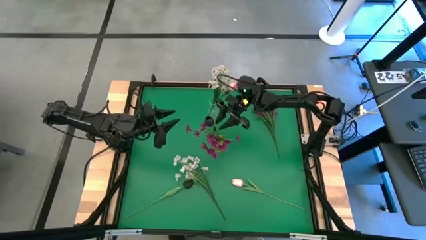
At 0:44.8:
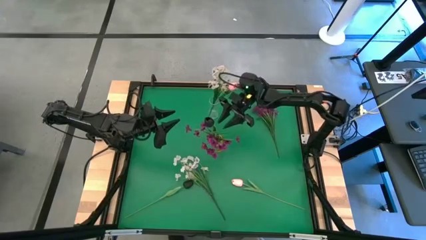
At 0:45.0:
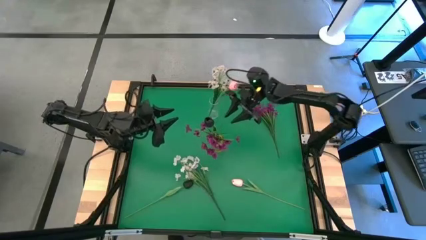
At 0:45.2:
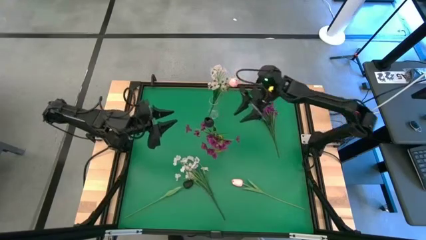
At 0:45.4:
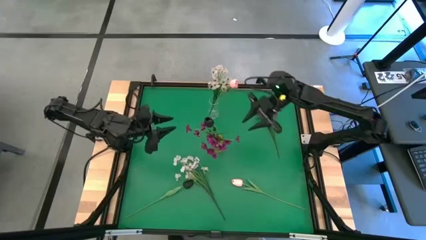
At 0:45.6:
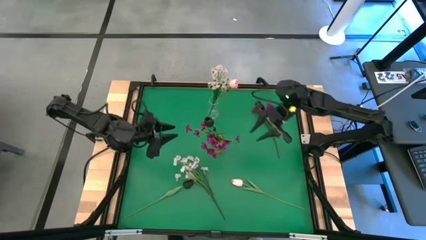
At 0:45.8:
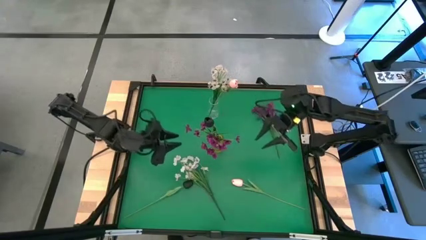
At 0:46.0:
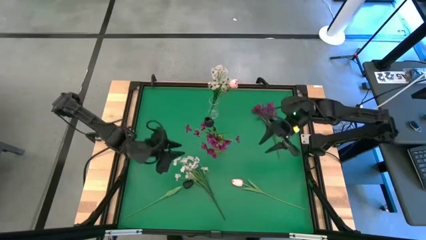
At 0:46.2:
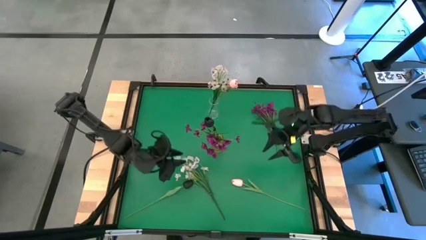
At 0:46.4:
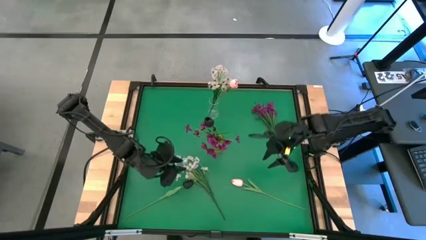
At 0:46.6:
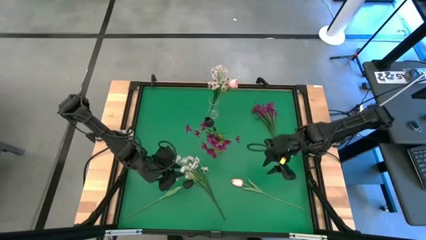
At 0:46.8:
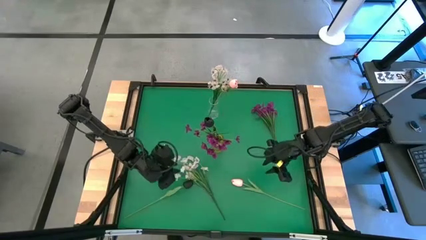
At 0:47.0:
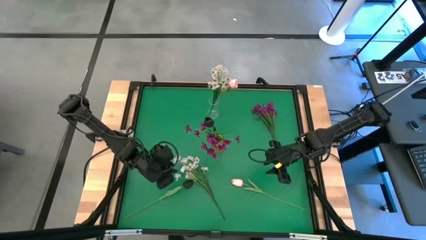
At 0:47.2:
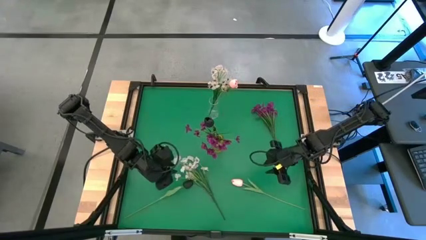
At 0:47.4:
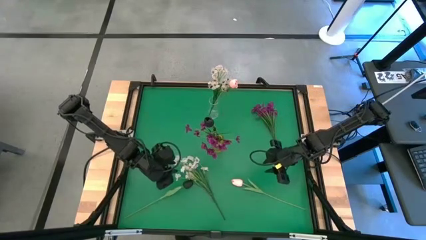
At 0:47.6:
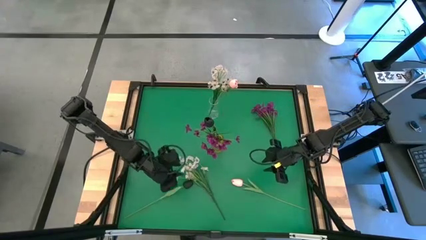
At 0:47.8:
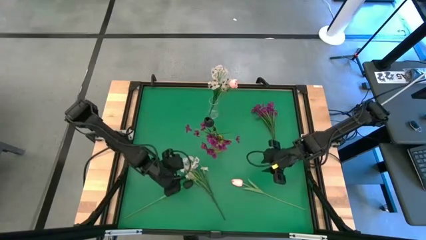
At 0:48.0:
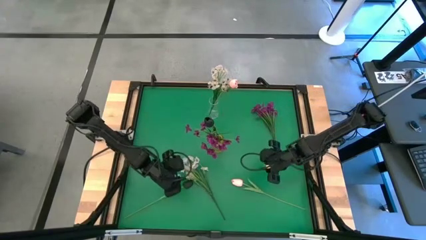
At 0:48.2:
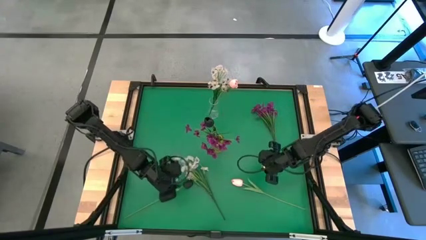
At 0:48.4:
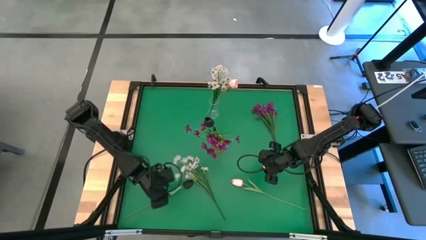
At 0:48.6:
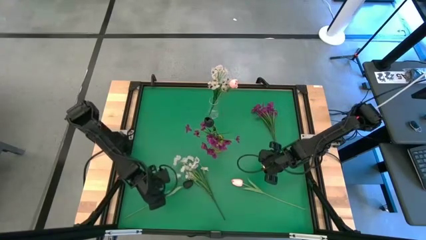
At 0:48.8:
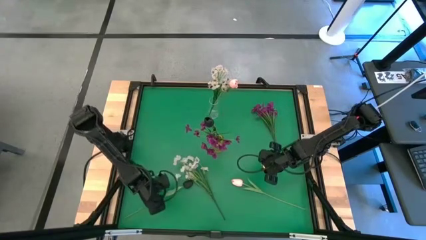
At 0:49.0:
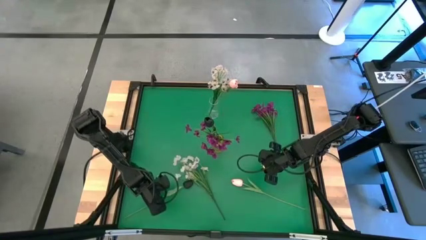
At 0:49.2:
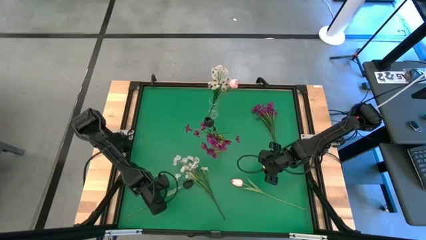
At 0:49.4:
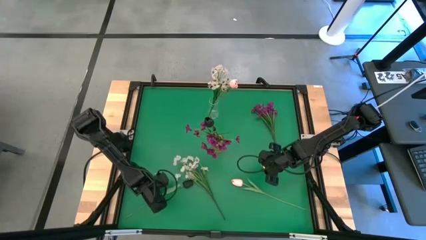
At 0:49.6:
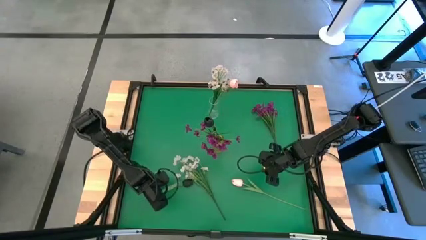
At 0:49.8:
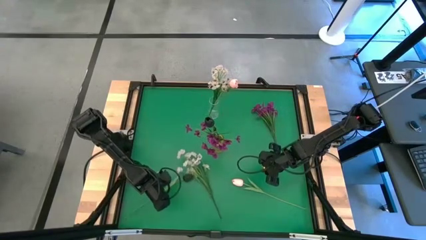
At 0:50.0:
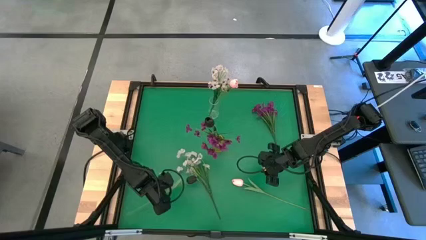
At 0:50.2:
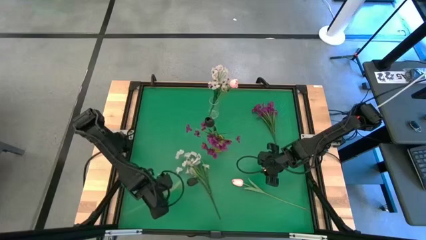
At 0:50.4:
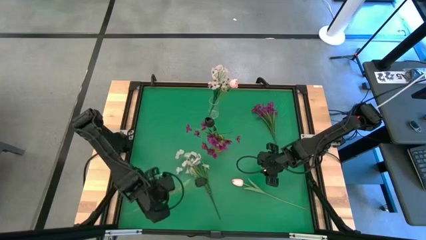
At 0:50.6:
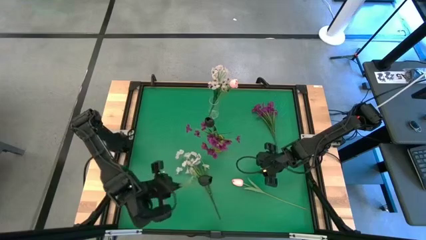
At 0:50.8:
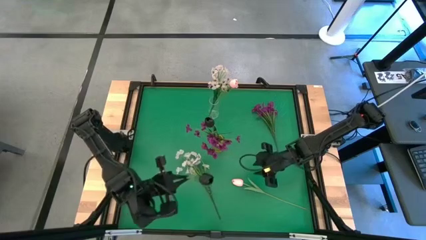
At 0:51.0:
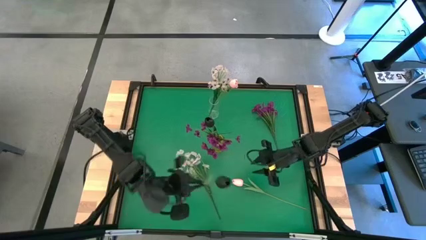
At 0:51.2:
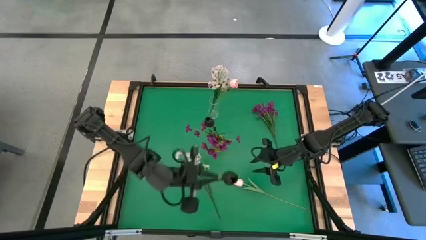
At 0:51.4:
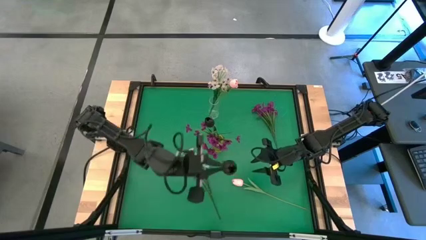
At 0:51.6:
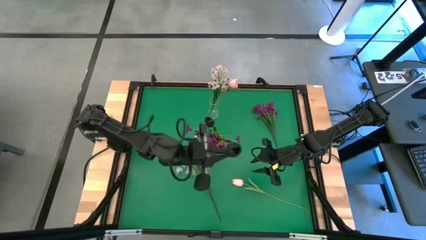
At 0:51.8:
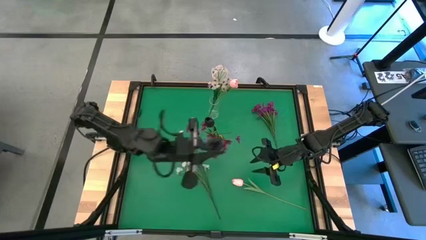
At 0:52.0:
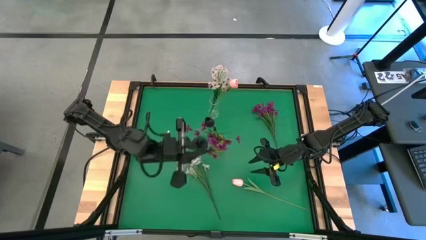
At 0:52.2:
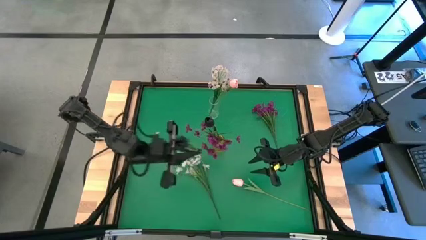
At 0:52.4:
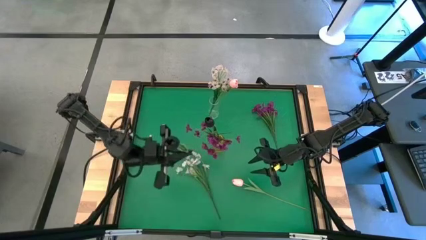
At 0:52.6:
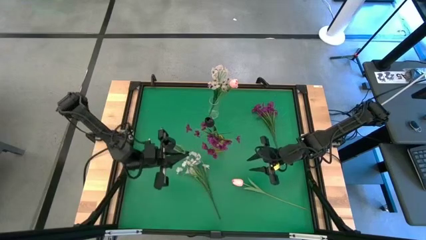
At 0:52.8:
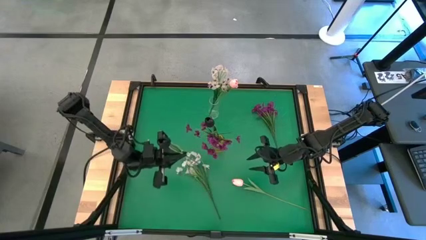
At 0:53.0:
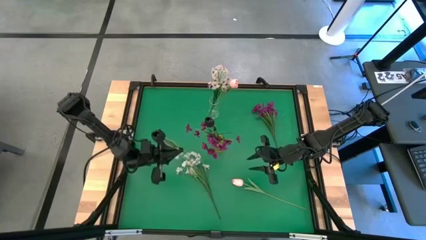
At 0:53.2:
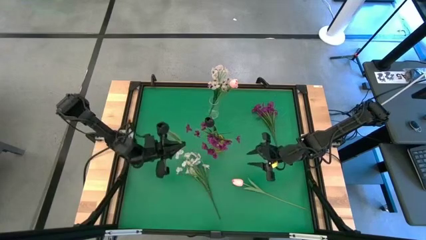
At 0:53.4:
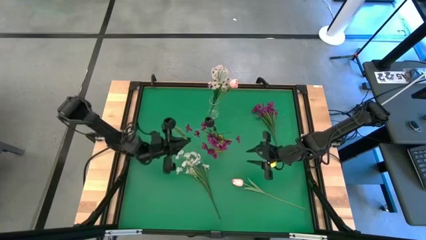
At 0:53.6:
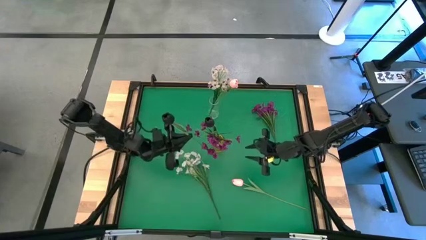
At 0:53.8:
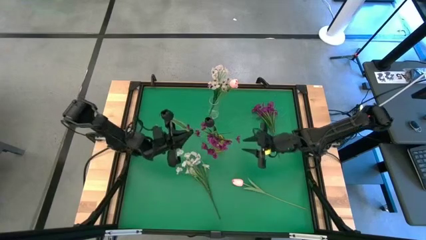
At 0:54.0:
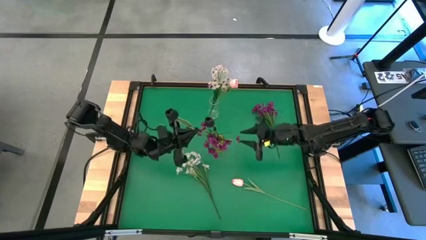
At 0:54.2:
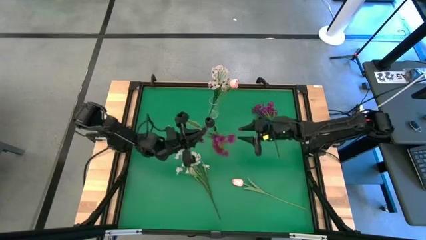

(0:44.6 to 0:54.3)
Task: Sort flowers into vase by color
Put the black flower into the yellow vase

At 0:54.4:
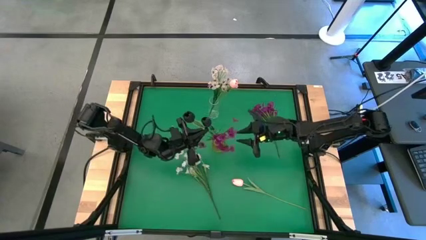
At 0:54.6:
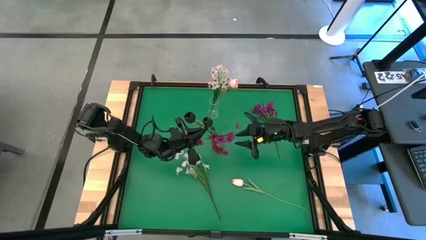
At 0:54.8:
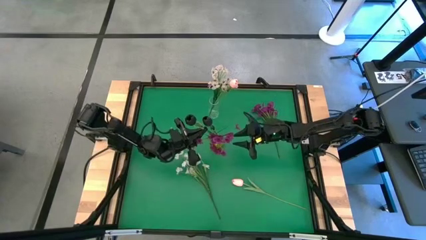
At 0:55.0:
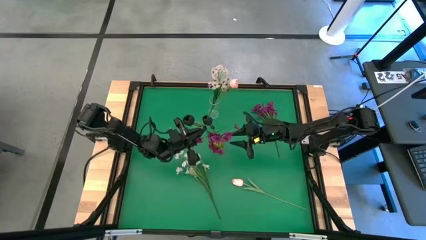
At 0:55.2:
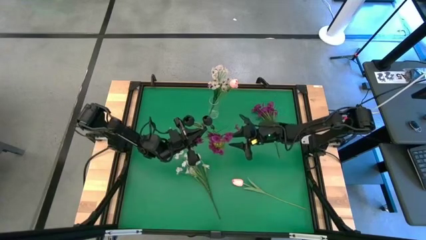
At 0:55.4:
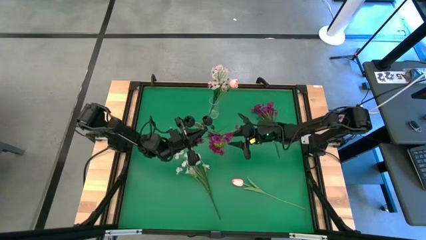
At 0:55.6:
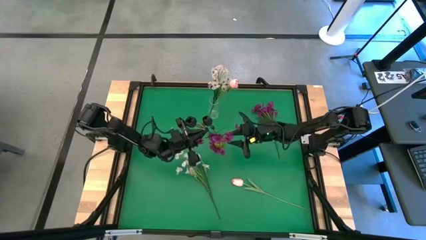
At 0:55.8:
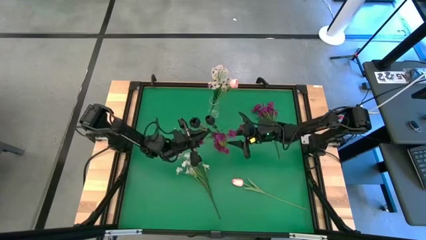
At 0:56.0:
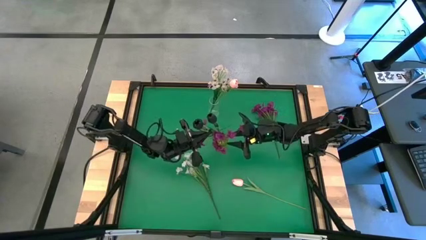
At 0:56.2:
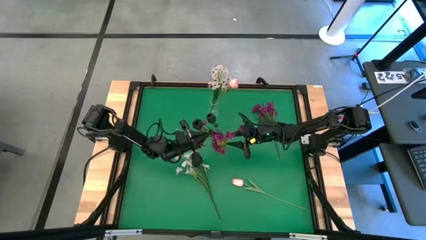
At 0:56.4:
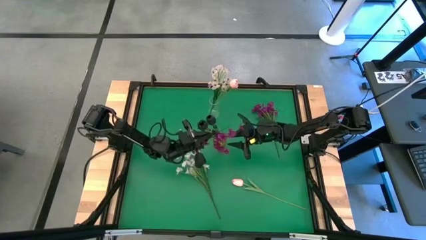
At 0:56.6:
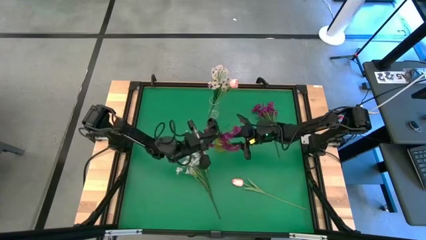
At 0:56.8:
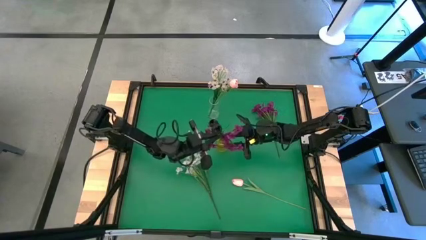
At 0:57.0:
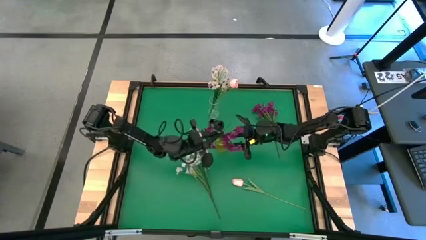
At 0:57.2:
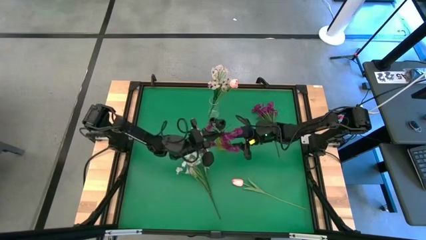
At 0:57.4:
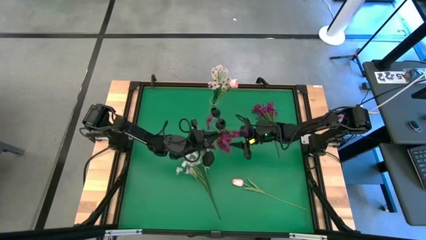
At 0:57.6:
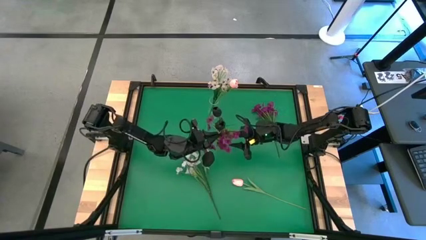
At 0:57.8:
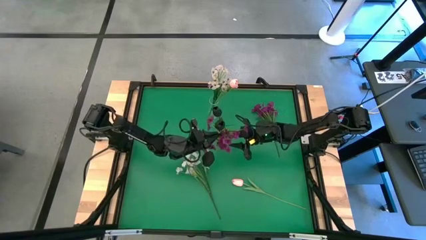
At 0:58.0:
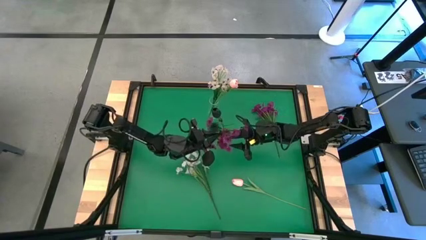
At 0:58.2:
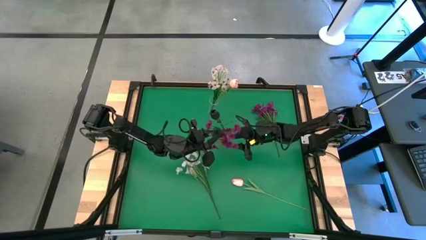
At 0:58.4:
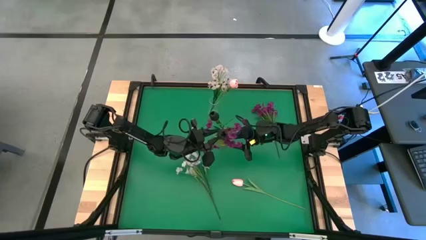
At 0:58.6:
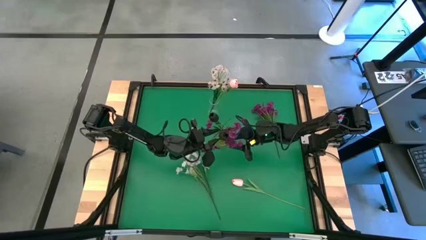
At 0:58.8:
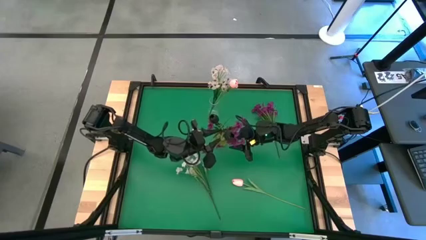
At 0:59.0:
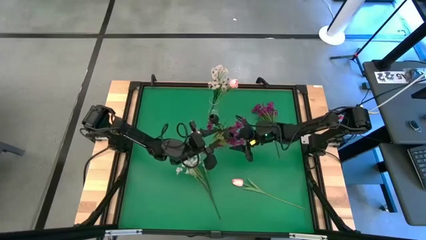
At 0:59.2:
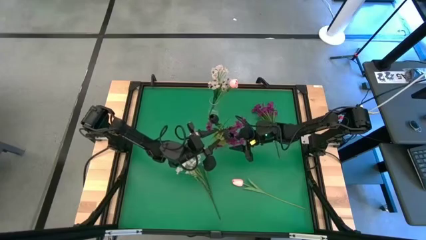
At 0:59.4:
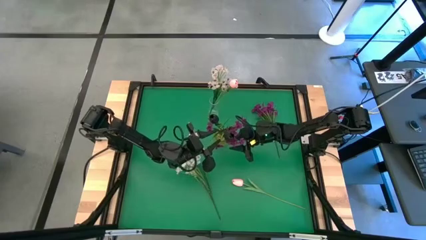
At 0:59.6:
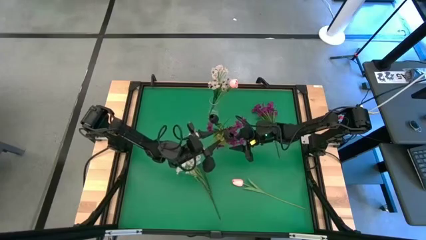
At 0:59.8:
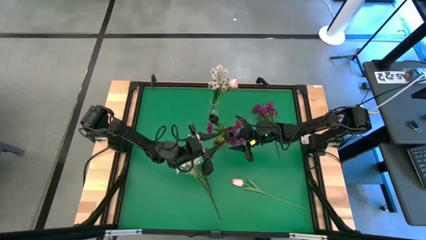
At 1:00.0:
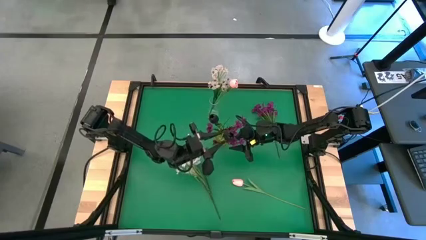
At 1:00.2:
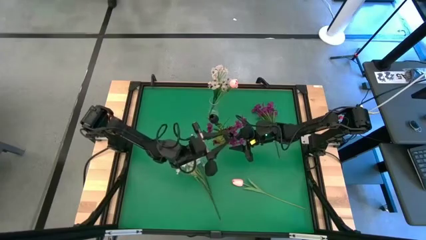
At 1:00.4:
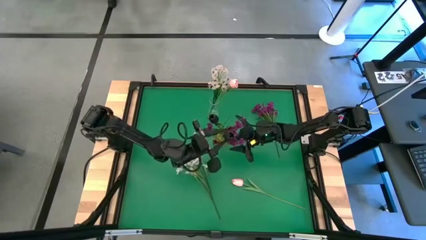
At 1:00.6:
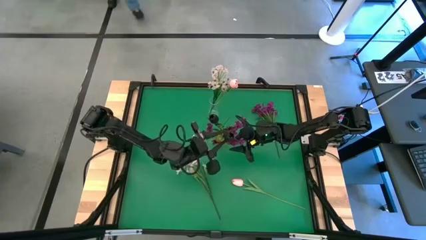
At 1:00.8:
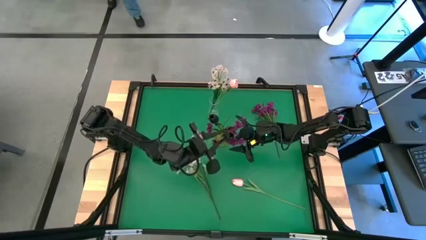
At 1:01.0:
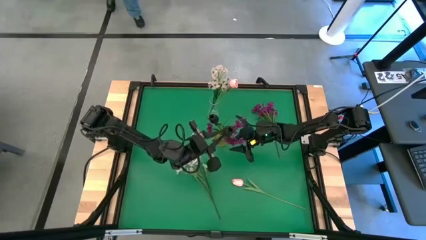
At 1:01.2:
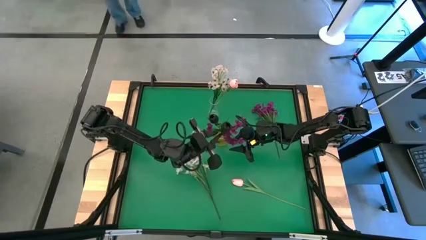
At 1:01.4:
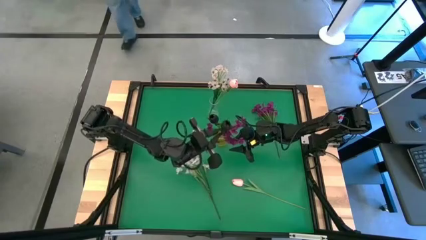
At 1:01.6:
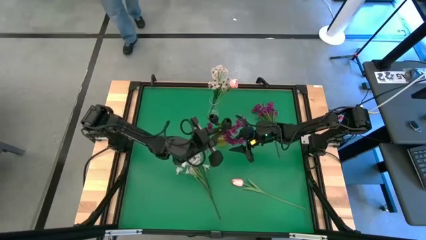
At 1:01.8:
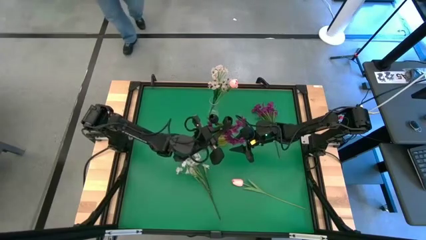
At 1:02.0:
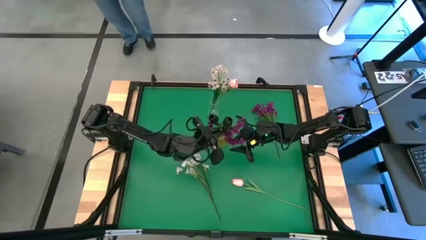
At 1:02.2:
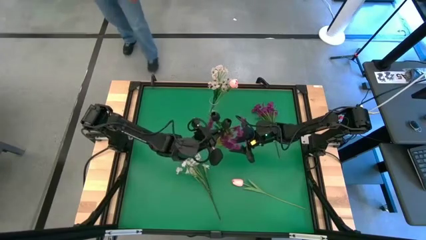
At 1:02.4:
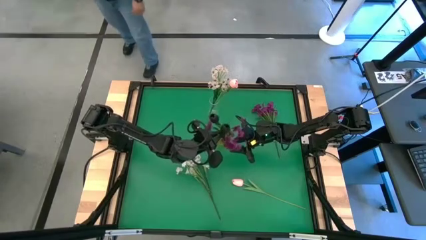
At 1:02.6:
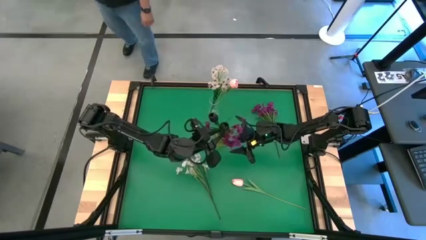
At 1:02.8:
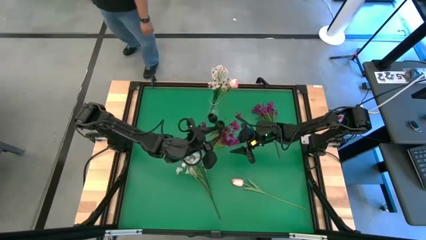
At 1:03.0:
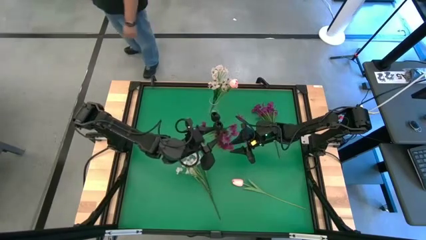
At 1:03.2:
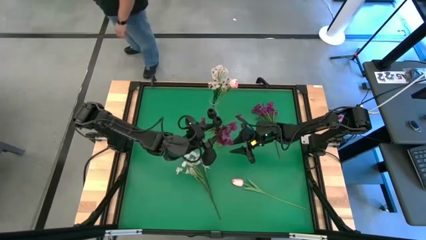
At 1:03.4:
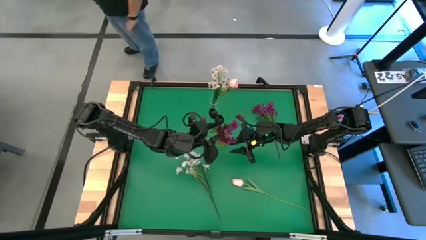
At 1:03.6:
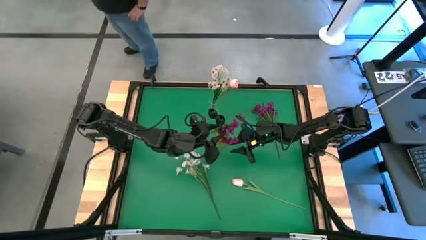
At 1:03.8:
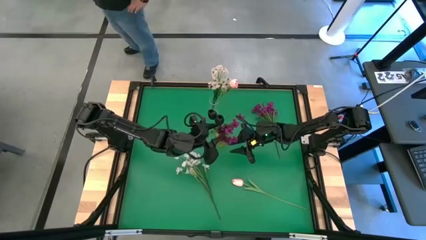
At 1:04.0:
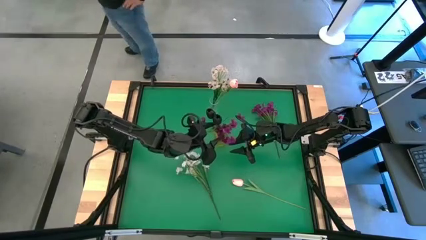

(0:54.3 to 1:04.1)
Put the black flower into the yellow vase
